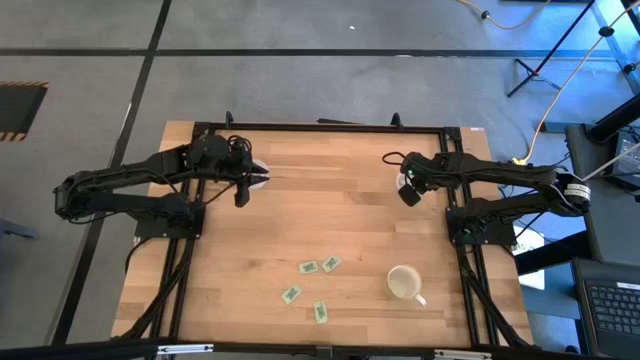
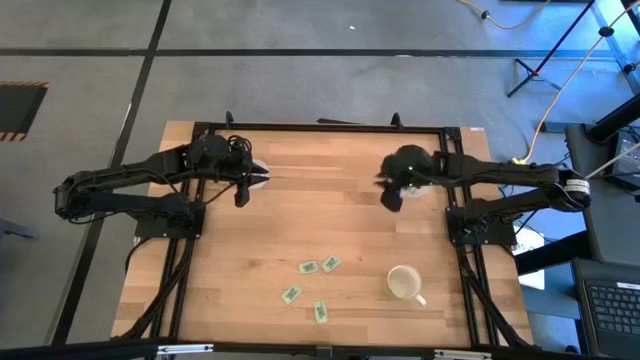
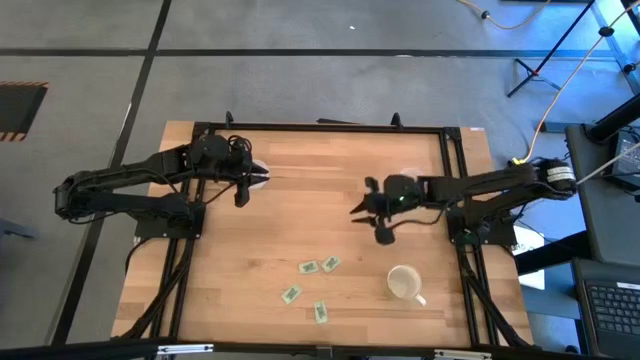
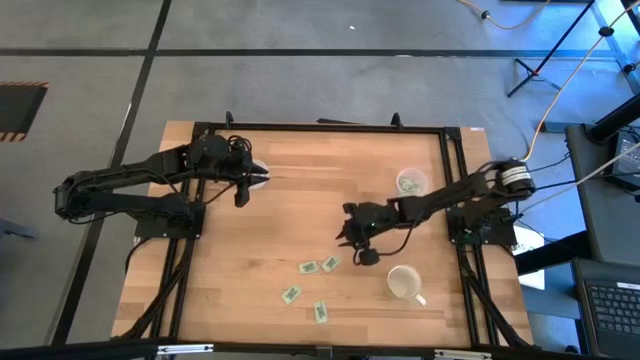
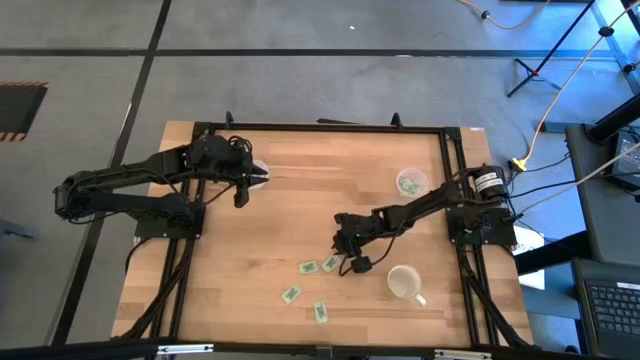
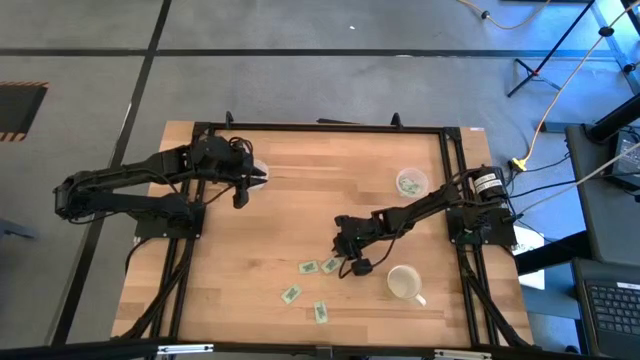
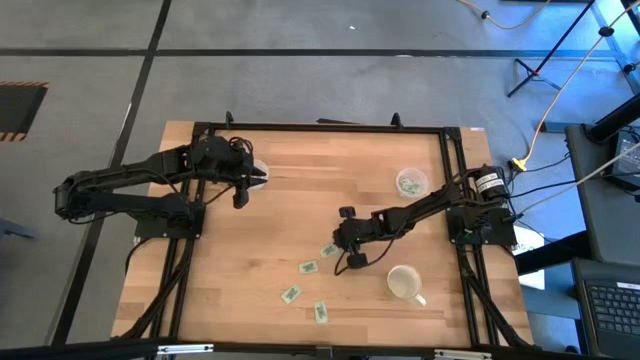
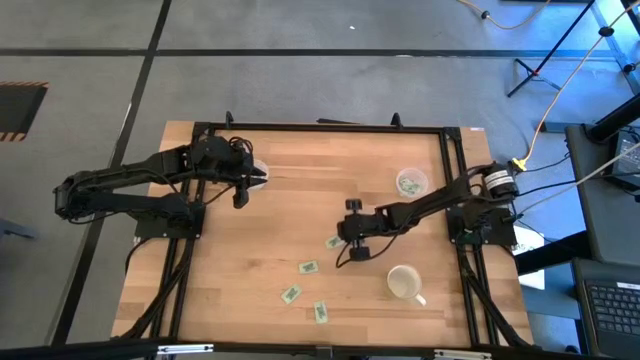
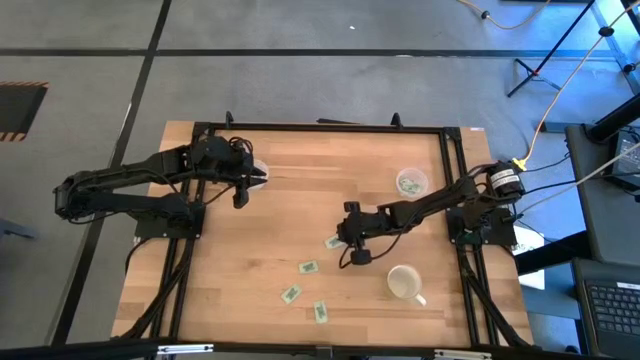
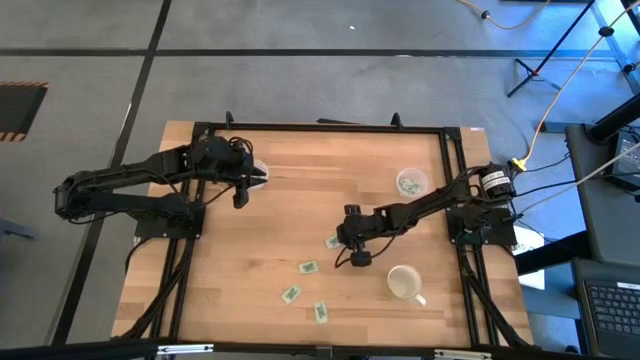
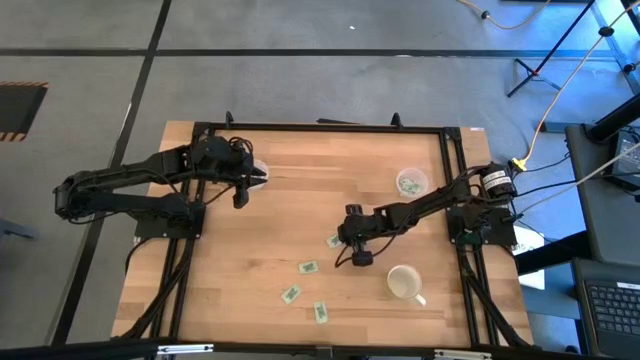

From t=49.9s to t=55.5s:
Task: Pick and place Stevia / Truvia into bins
Put the stevia packet into the right transparent container

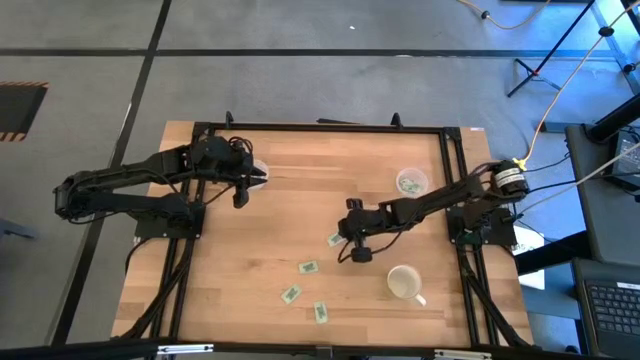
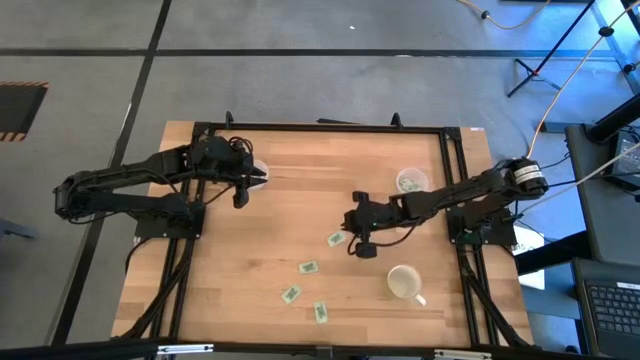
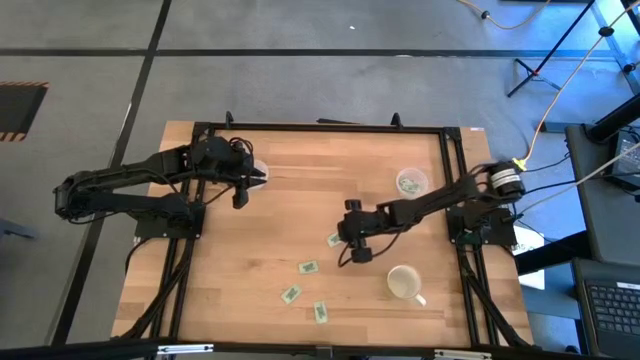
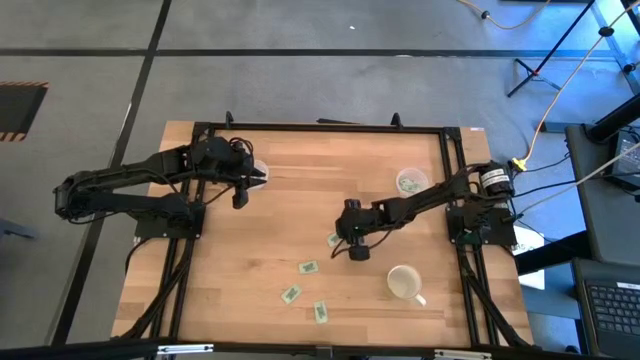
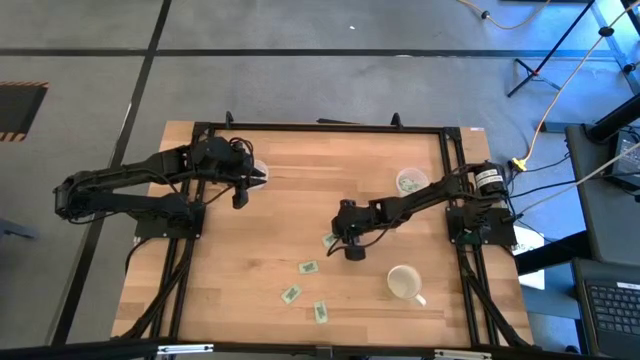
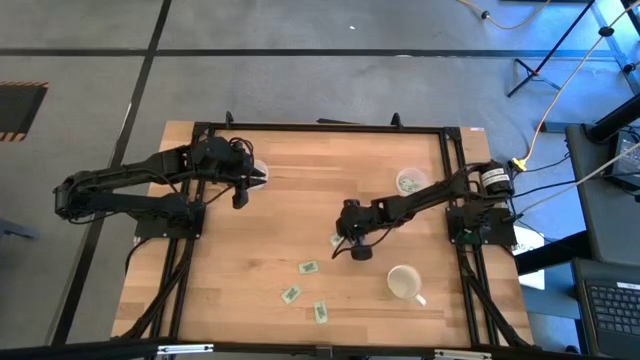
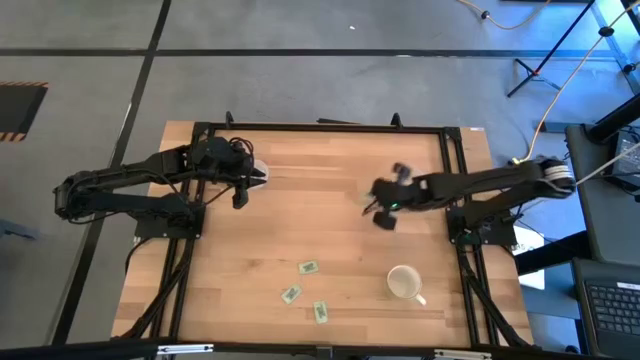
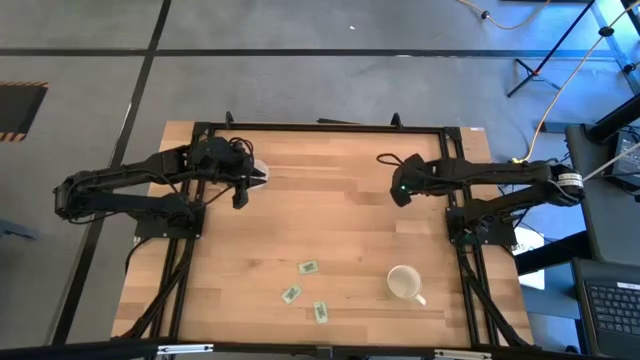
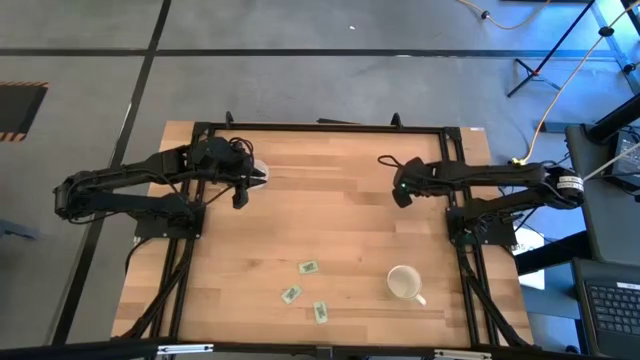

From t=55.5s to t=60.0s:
Put the stevia packet into the right transparent container

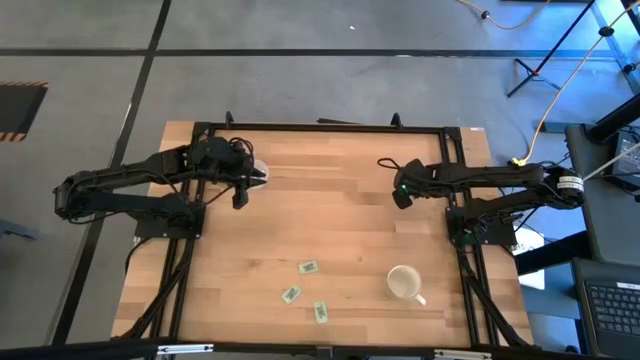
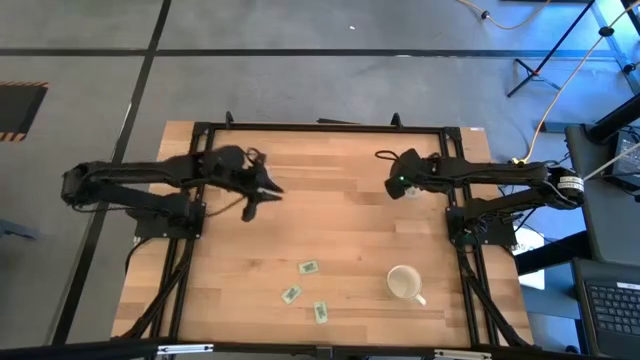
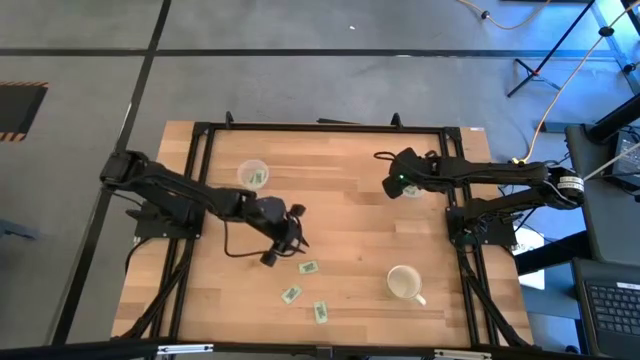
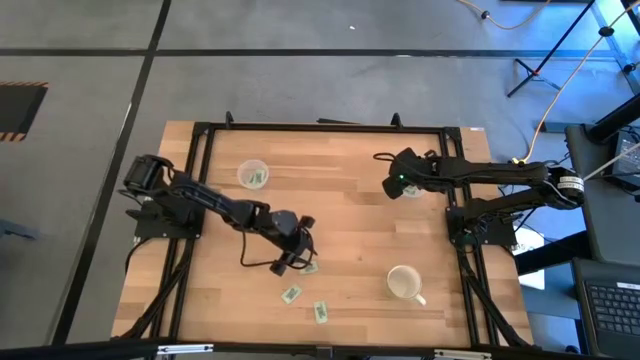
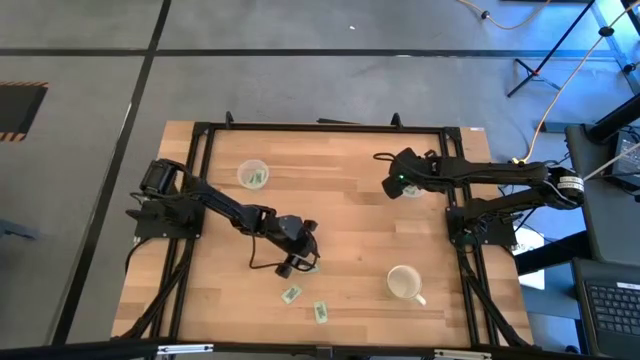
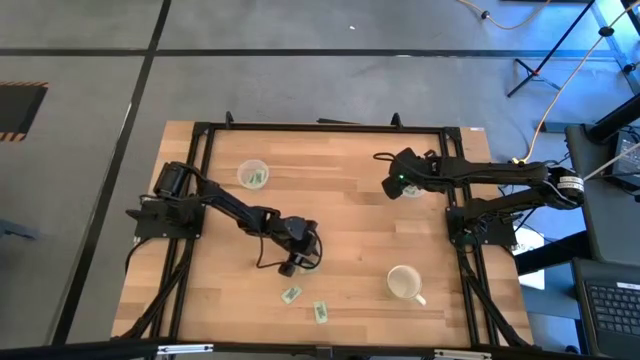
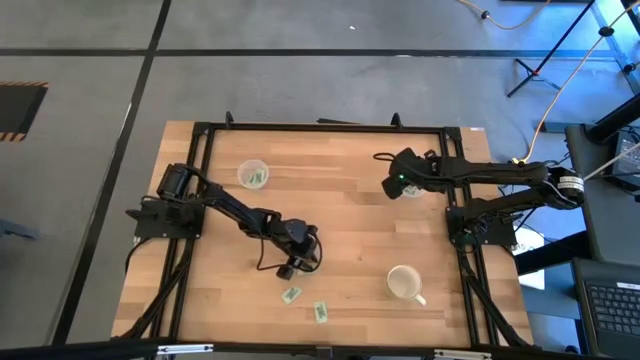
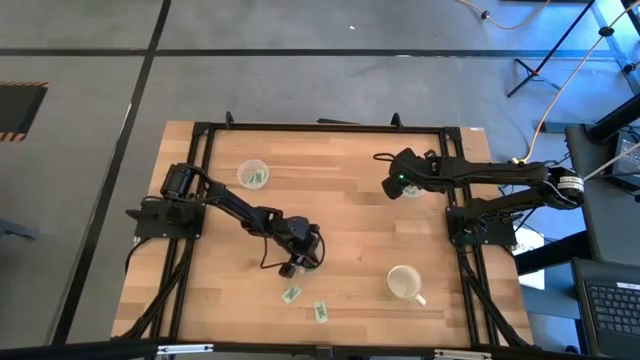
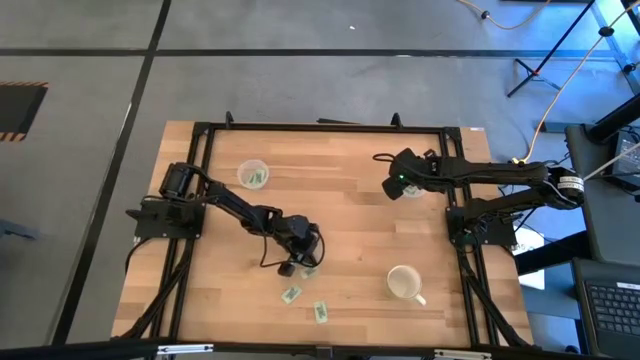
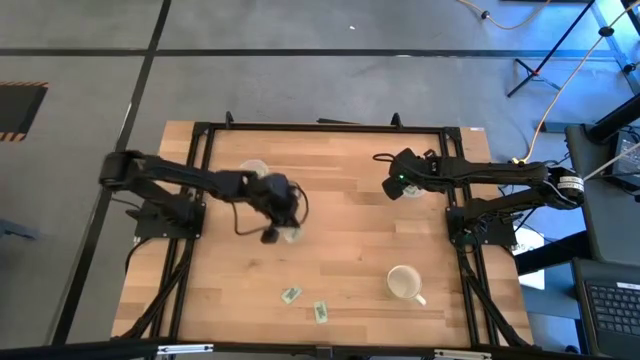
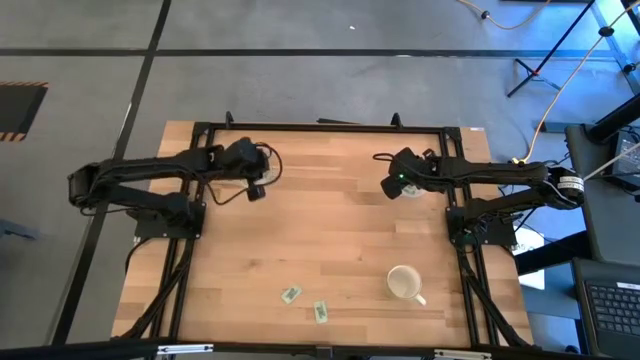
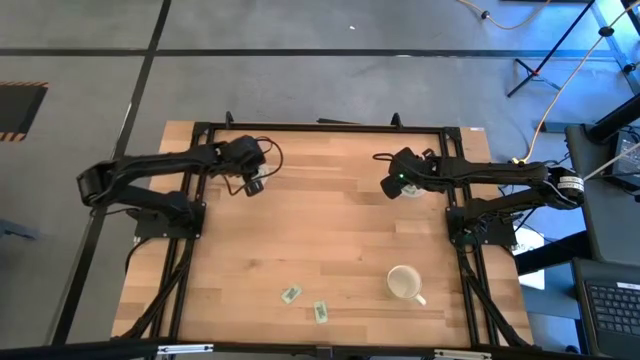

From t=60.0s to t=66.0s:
Put the stevia packet into the left transparent container

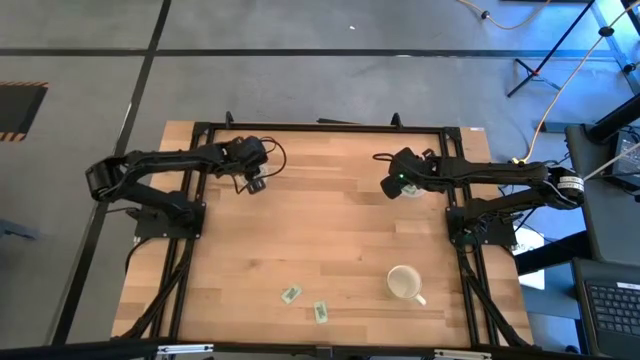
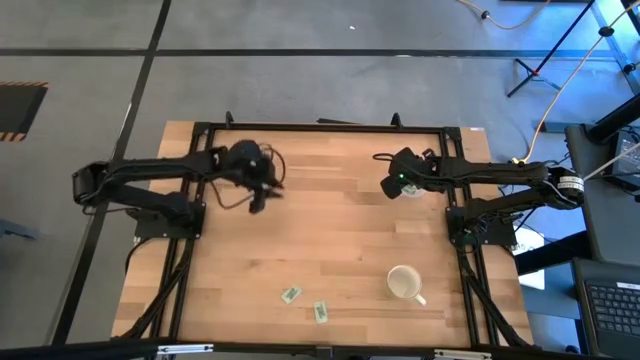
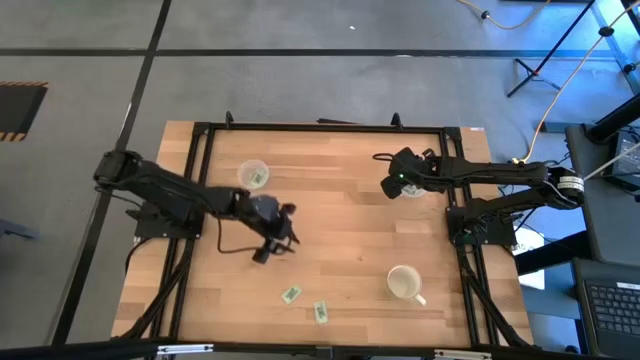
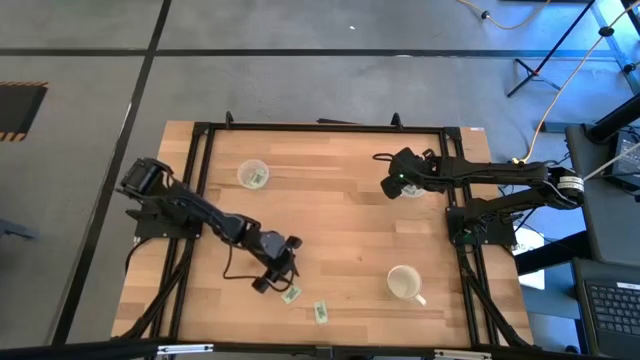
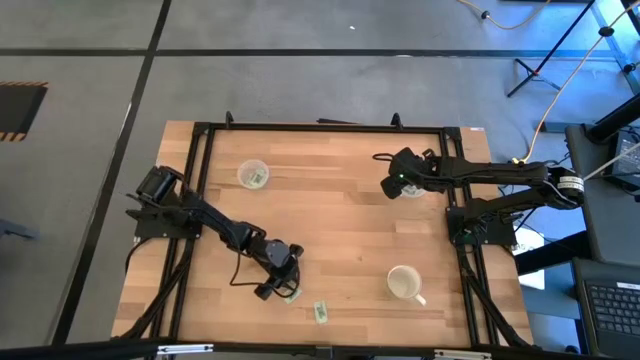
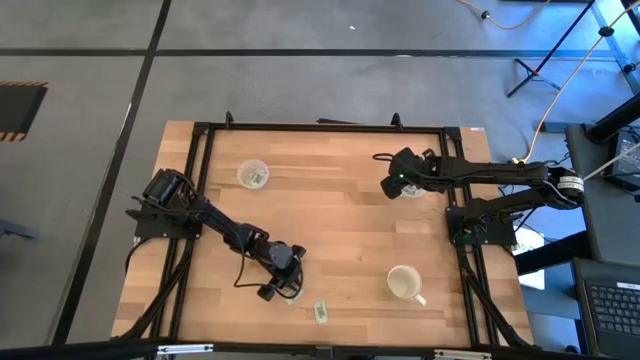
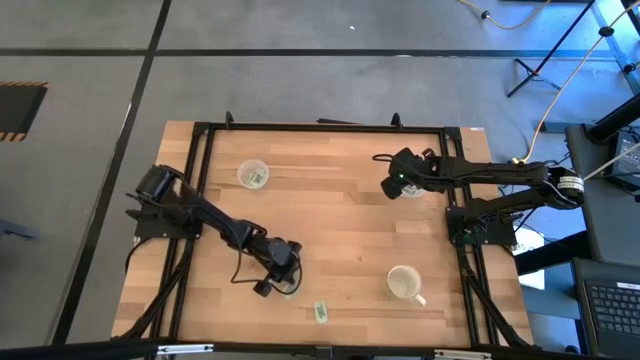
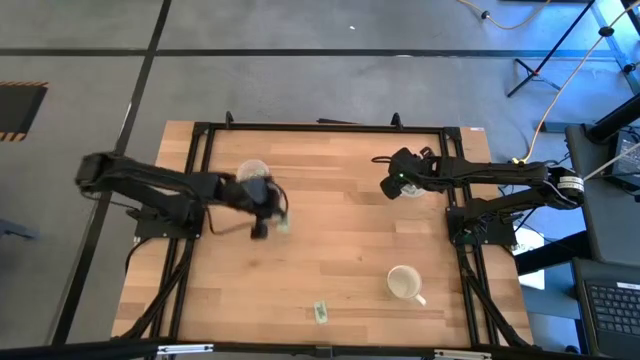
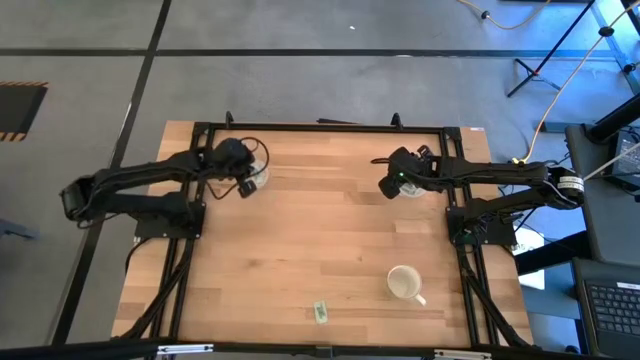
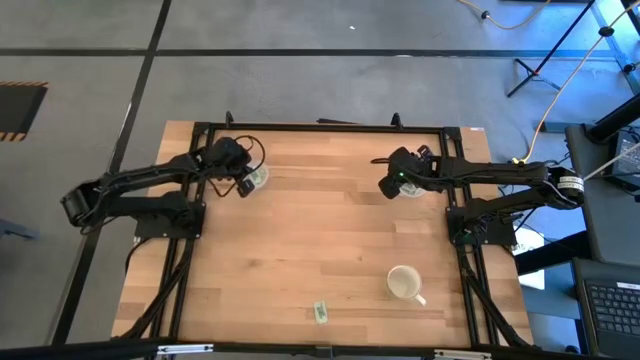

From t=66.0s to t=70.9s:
Put the stevia packet into the left transparent container
